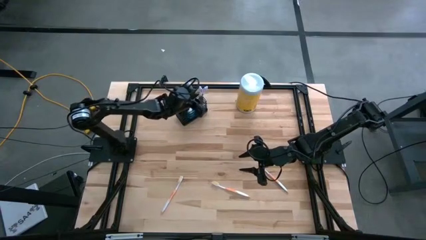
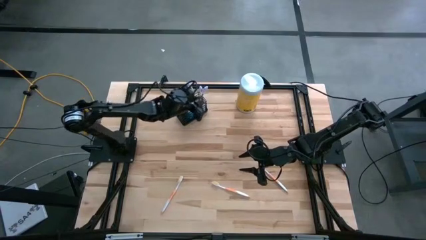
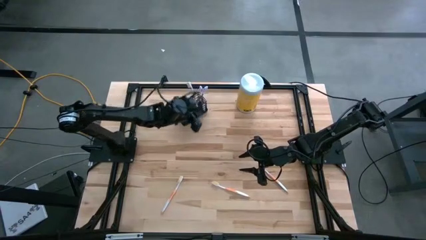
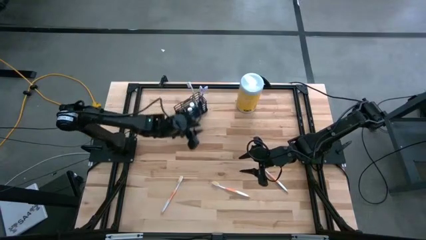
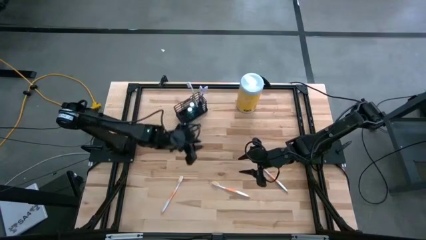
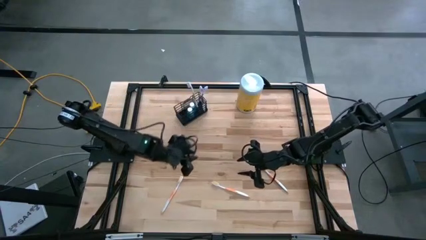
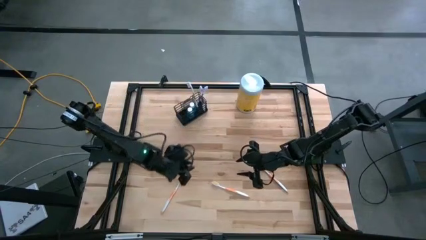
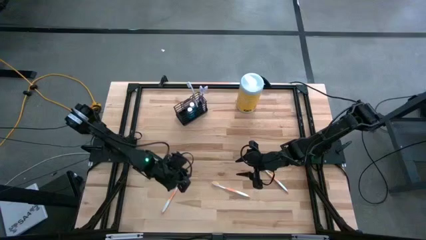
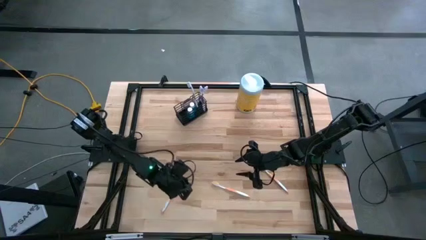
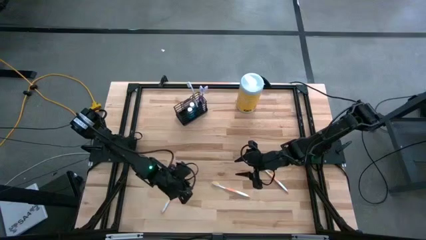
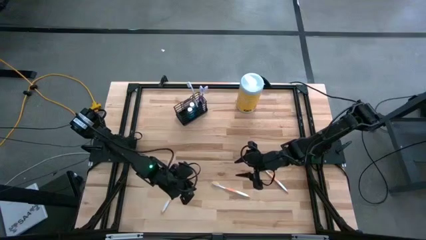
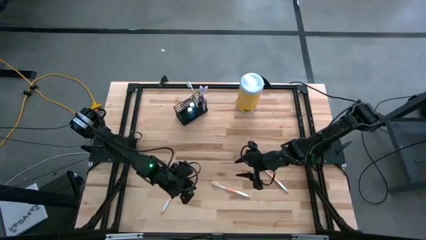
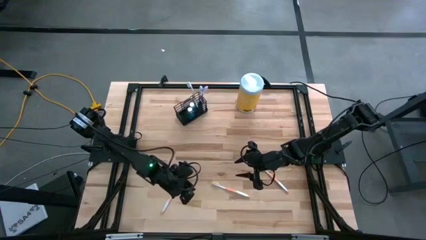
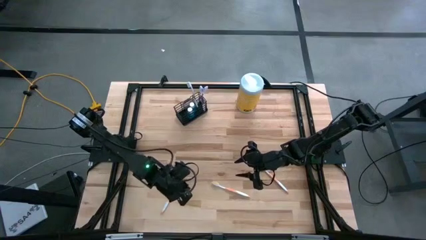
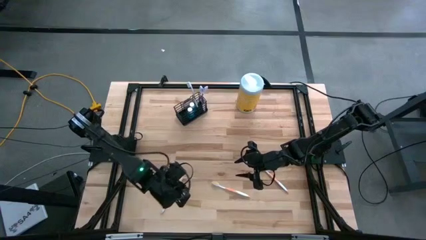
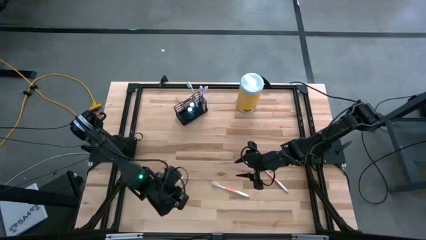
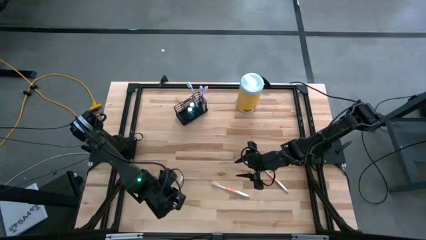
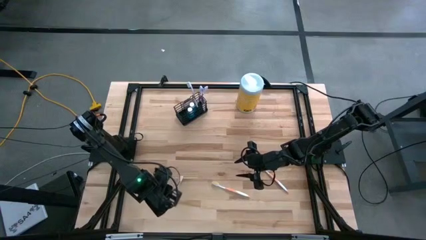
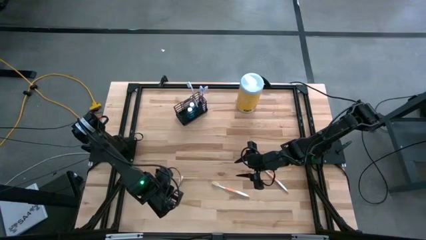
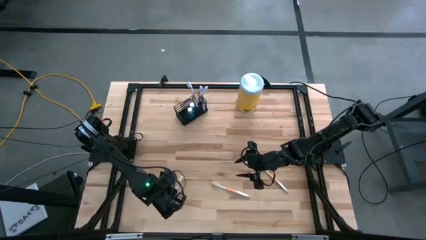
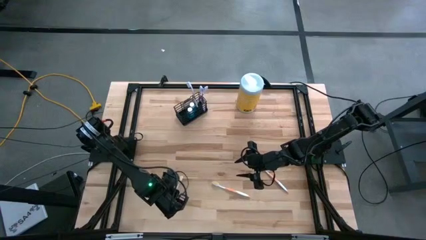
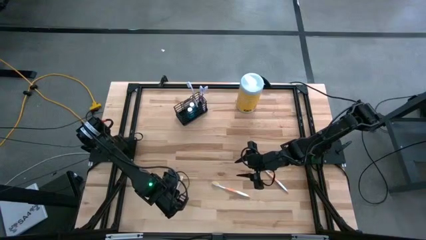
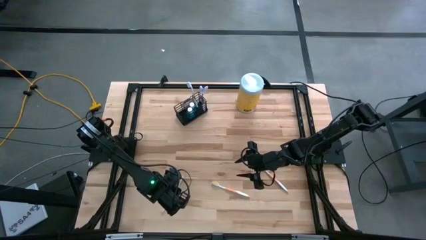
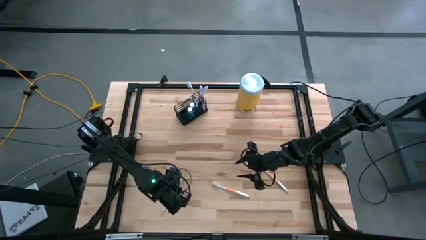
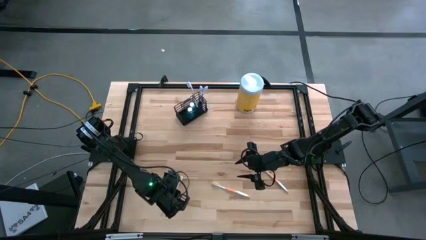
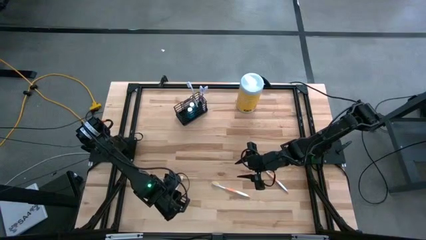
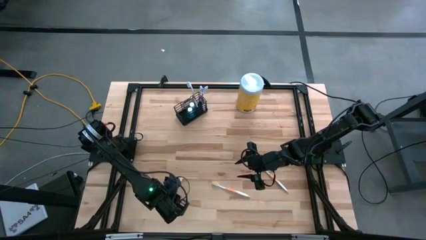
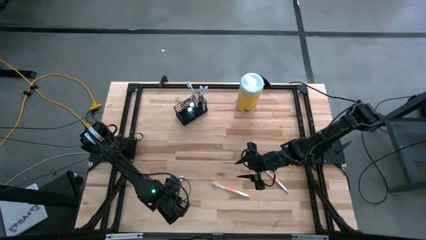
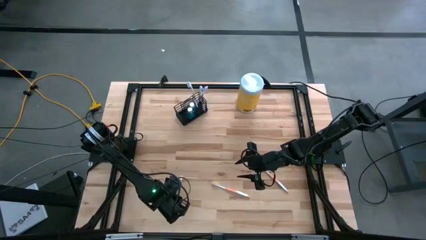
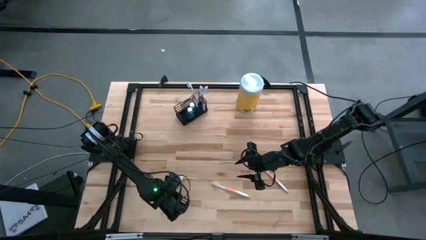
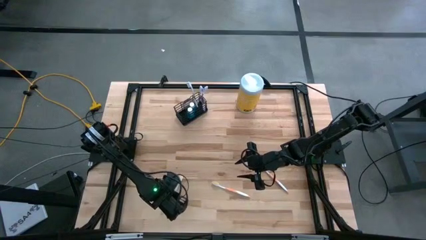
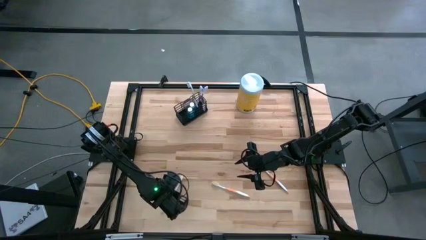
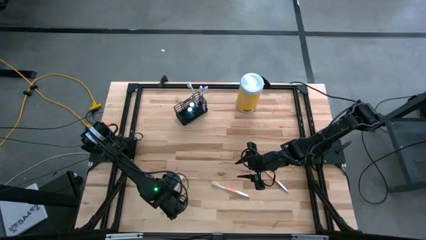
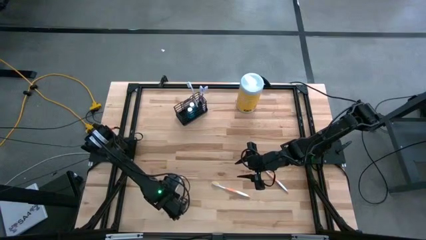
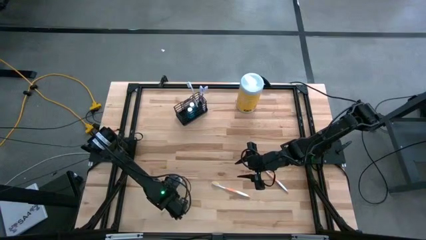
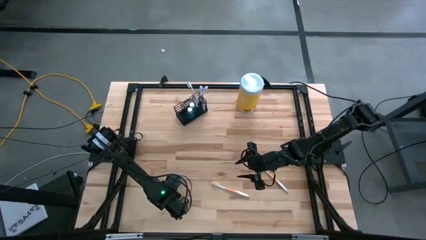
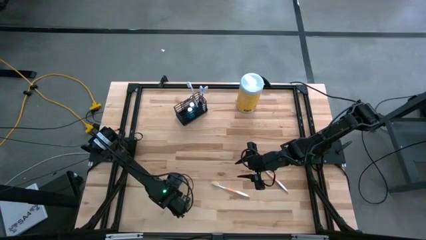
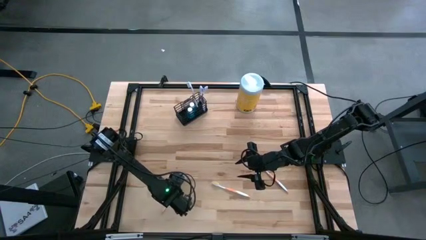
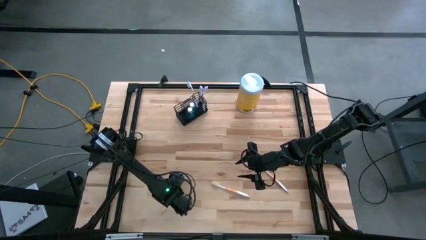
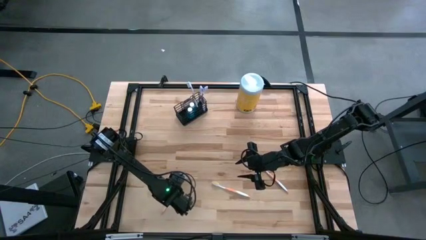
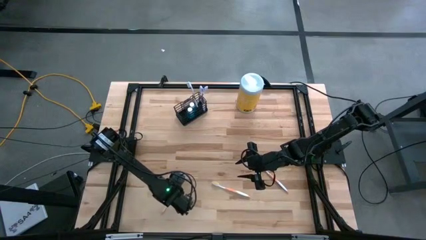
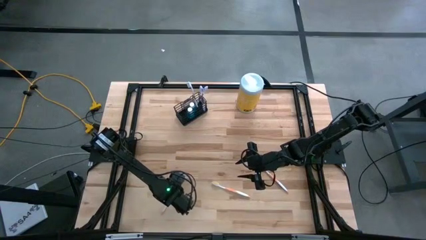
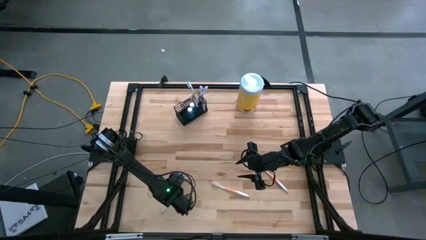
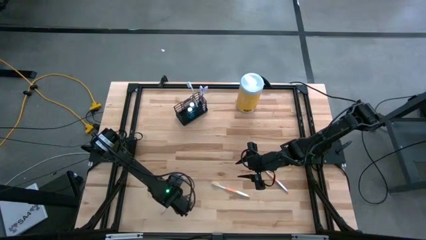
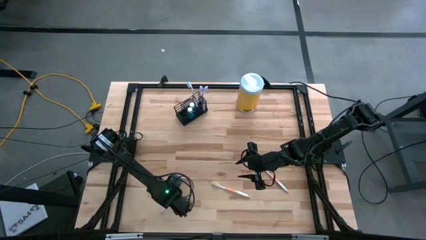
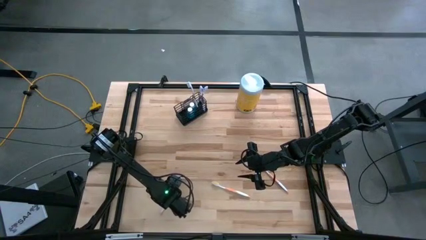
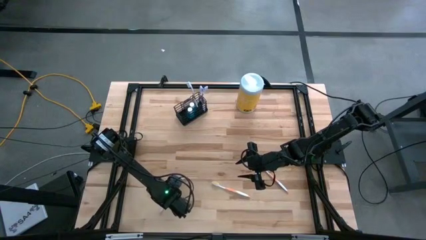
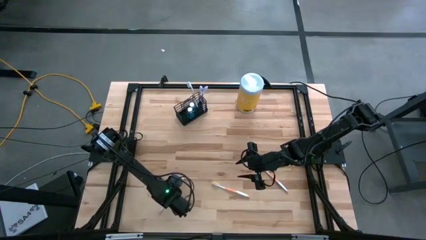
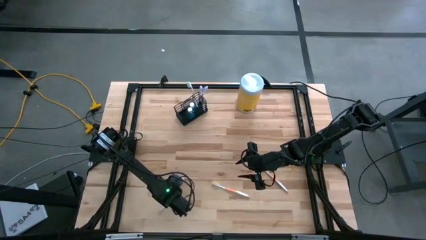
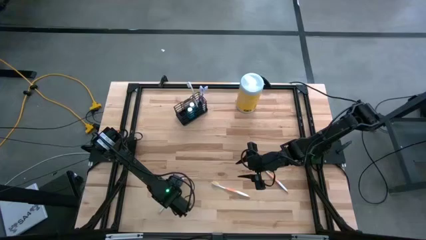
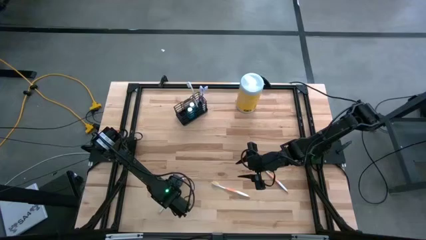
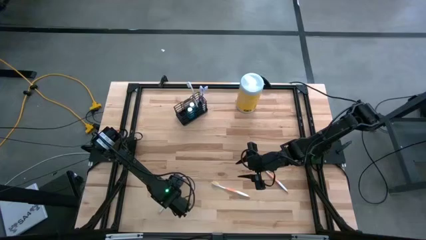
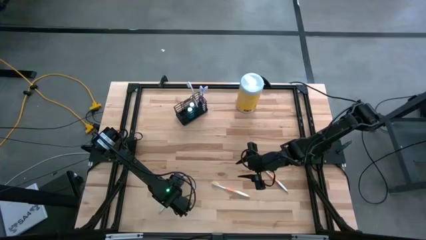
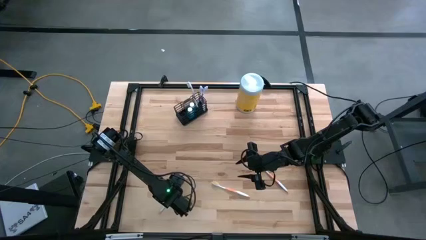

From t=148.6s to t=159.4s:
Task: Pick & Place toothbrushing station
Put the left orange toothbrush into the left section of the wire organizer

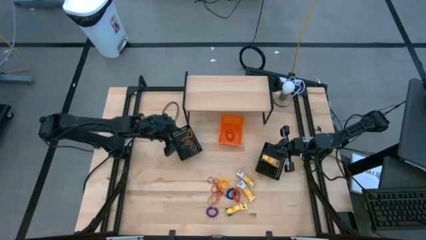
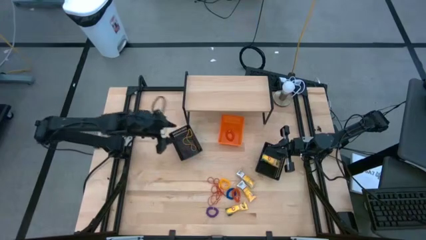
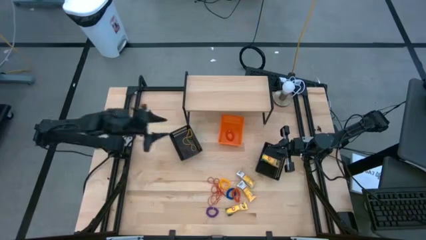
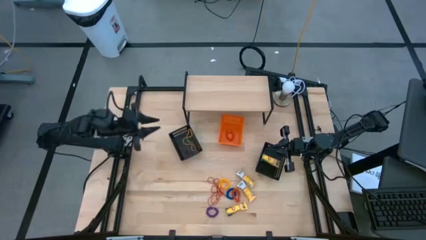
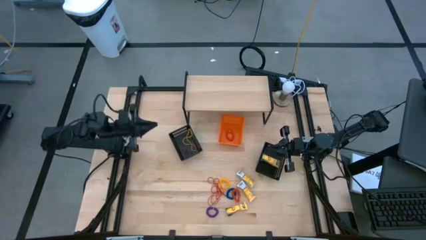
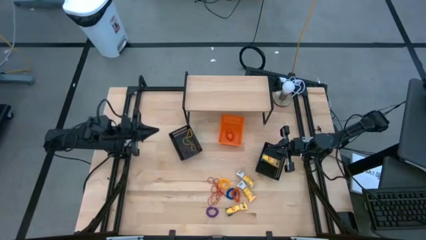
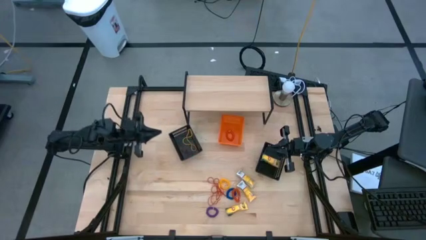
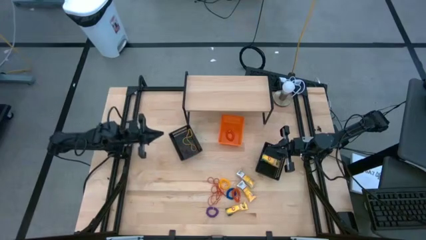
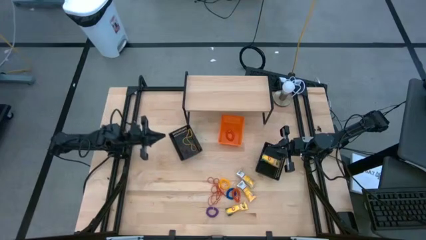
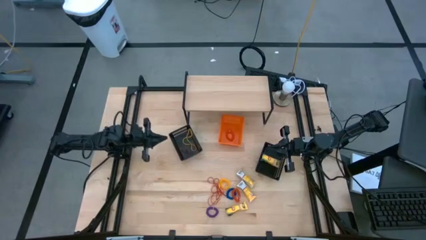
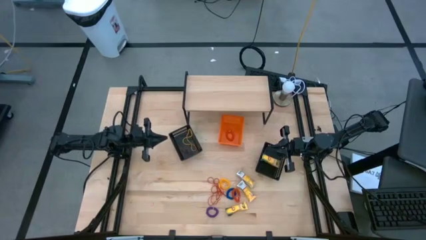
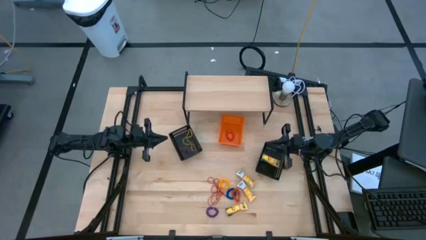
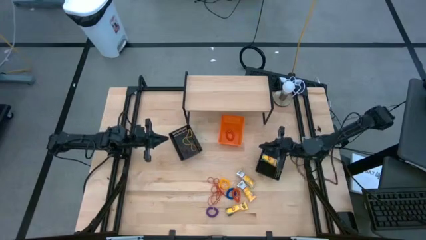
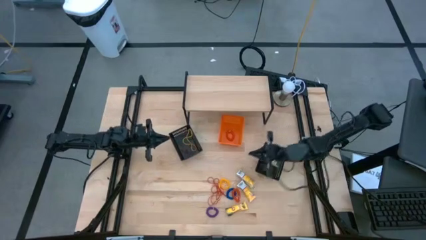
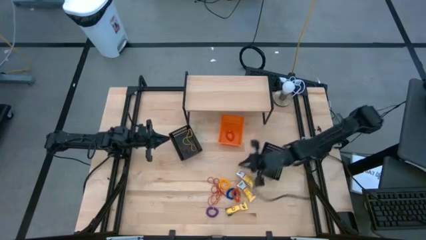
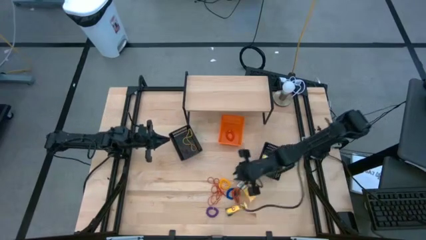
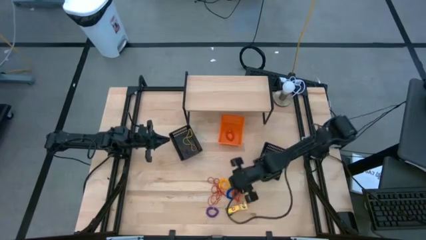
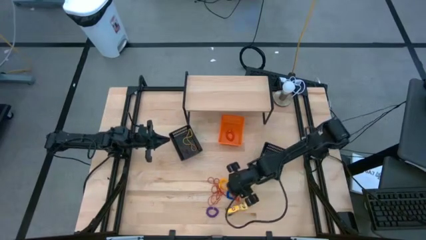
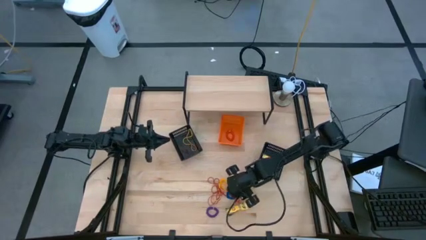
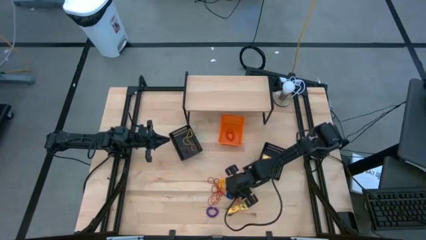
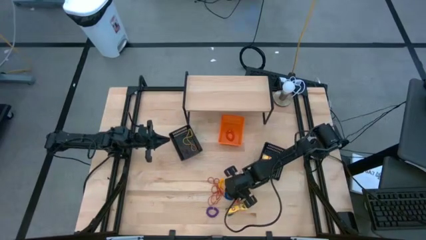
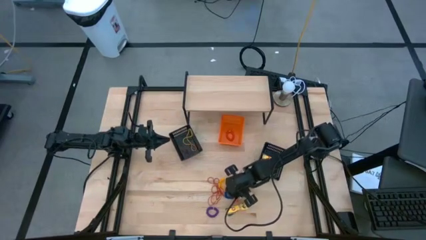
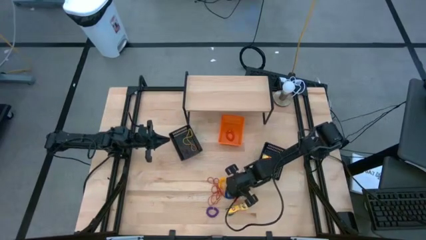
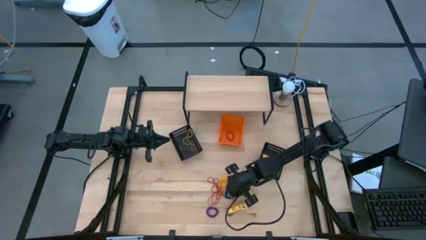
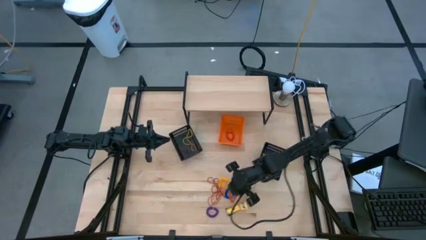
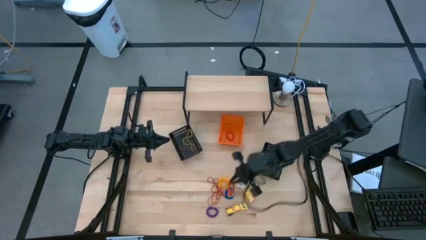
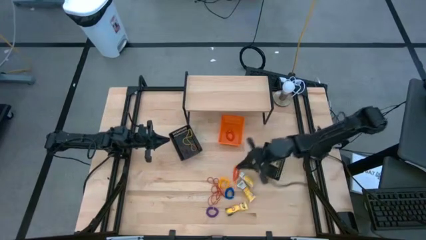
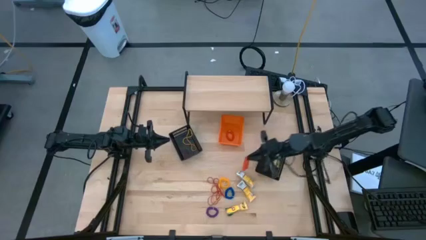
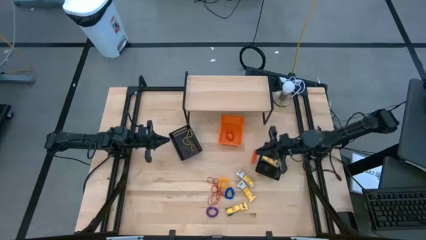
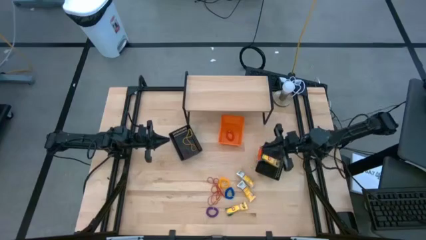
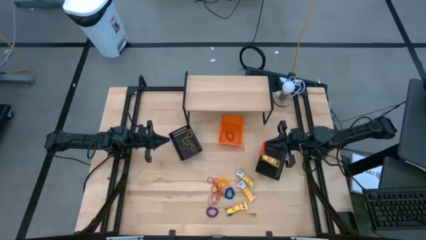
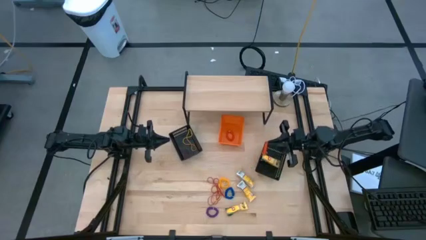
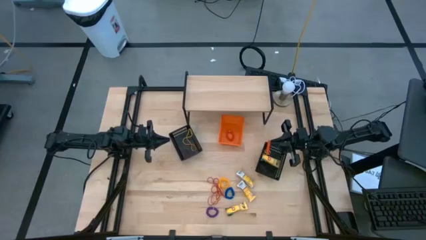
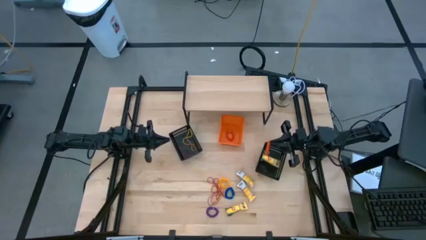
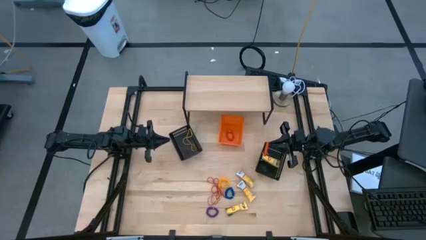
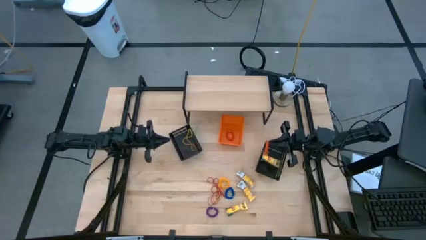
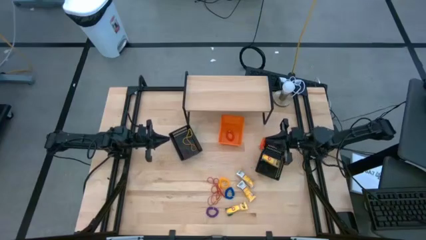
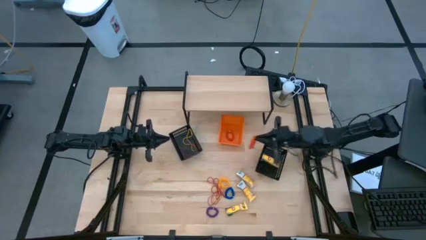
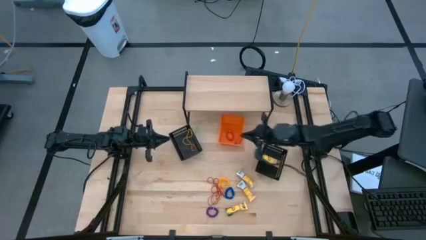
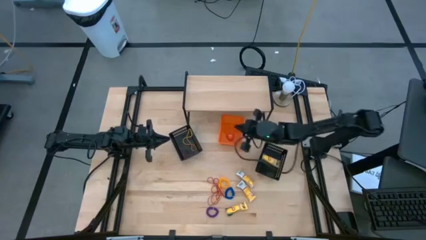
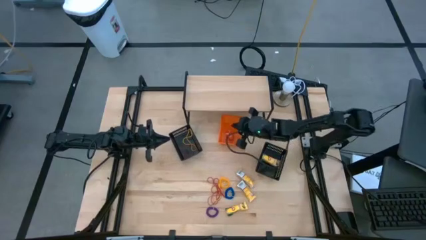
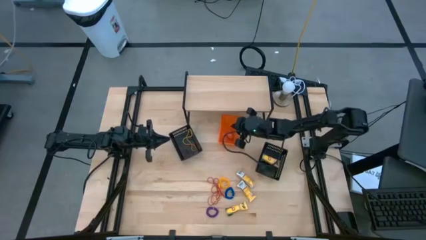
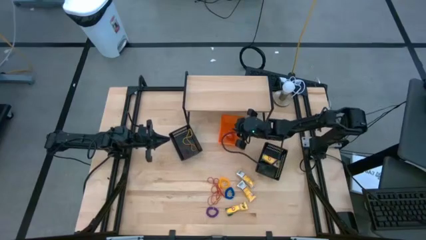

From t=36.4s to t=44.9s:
Task: Pick & Place Office Desk Supplies
Put the orange spring keychain into the orange bin
